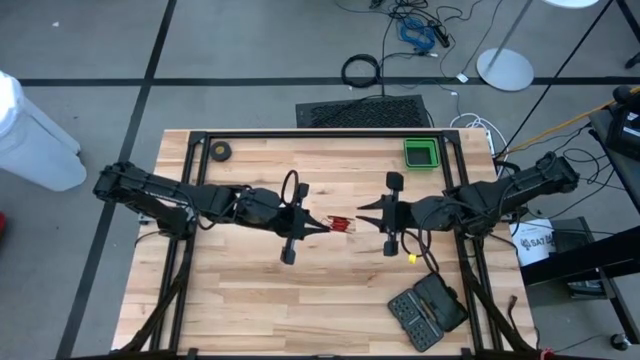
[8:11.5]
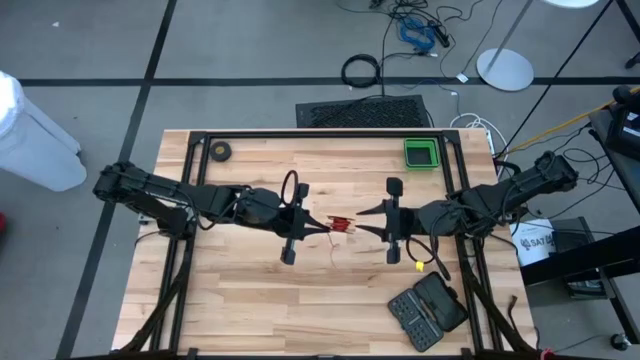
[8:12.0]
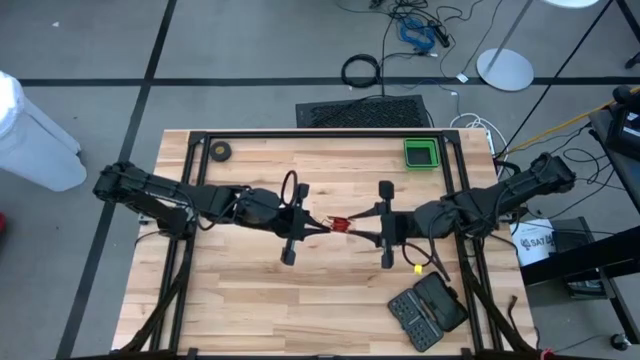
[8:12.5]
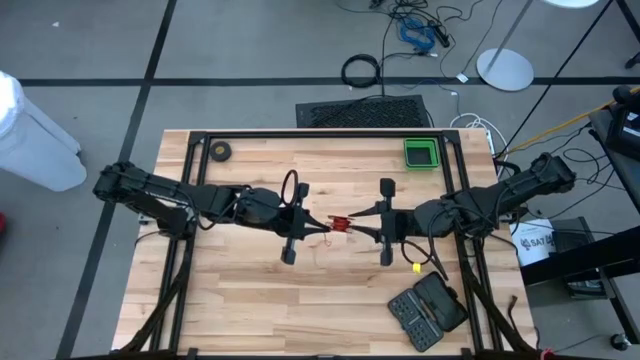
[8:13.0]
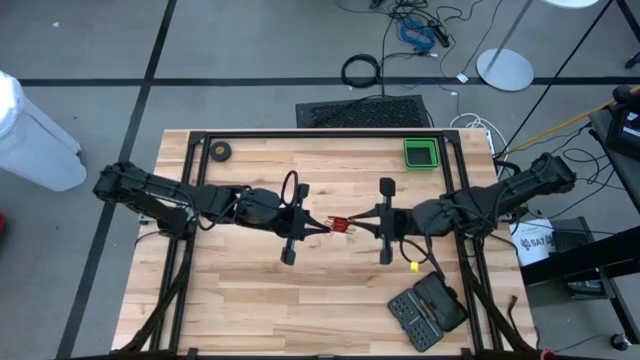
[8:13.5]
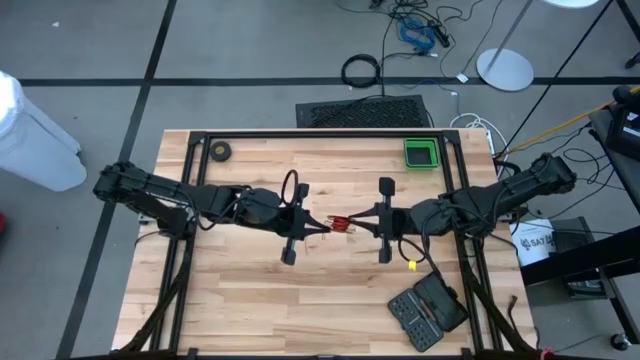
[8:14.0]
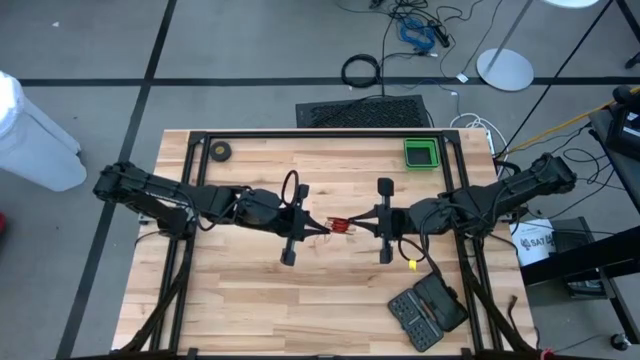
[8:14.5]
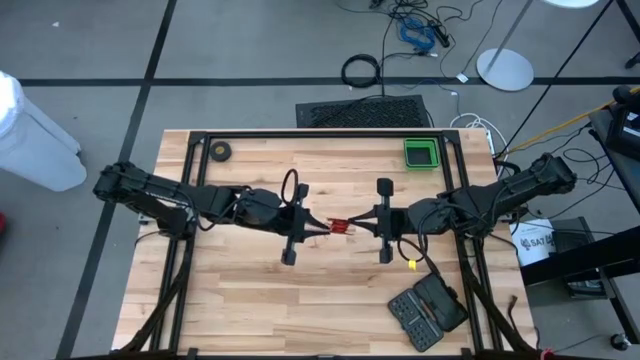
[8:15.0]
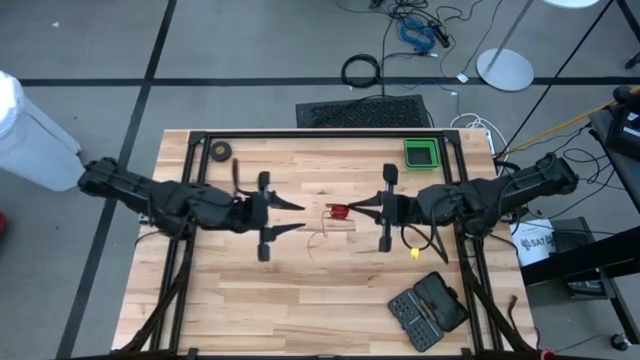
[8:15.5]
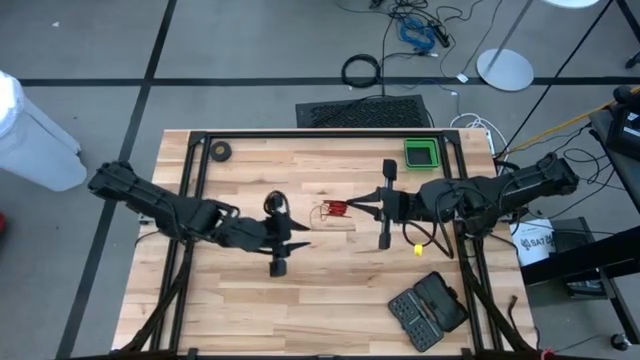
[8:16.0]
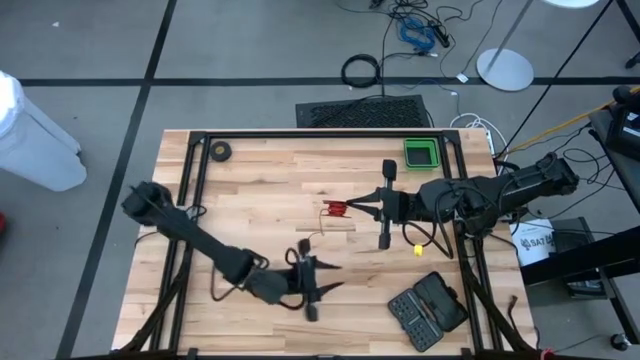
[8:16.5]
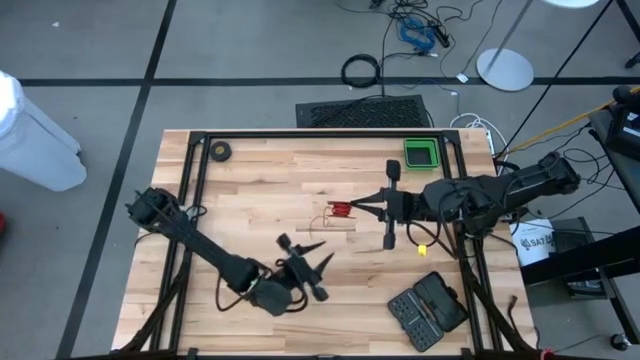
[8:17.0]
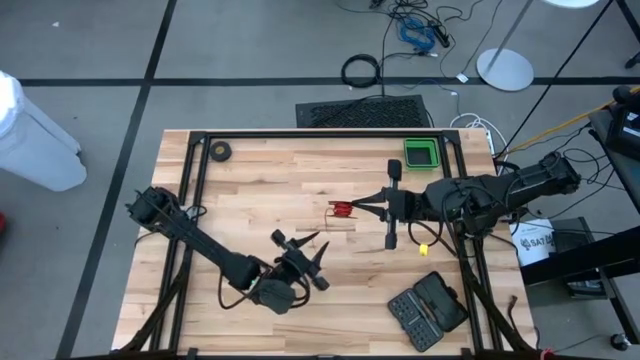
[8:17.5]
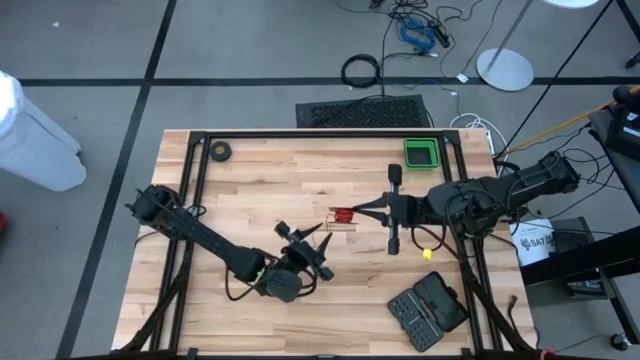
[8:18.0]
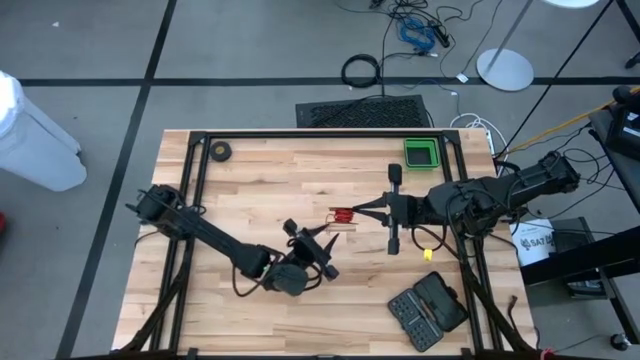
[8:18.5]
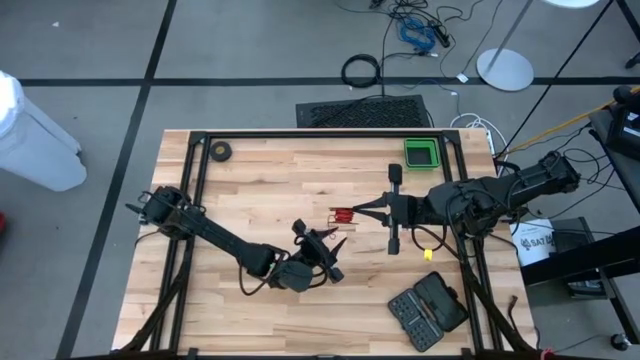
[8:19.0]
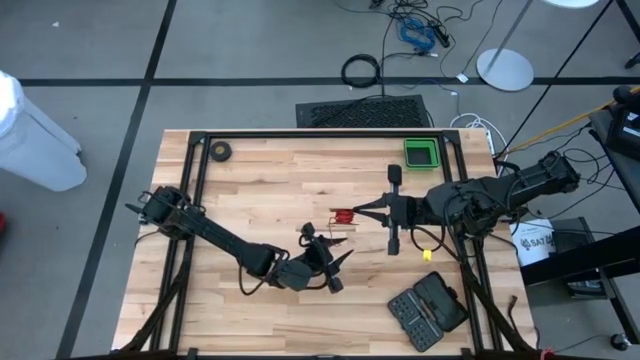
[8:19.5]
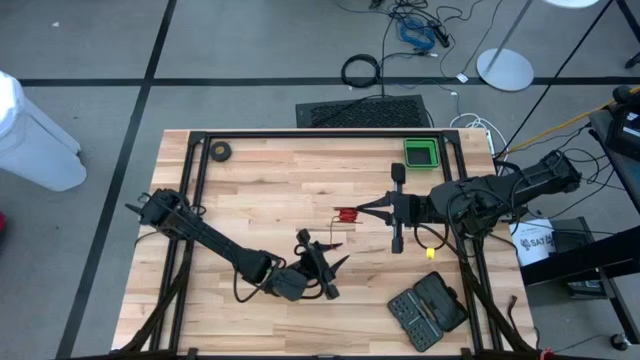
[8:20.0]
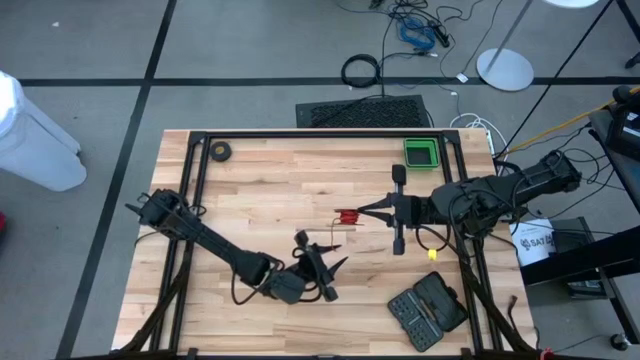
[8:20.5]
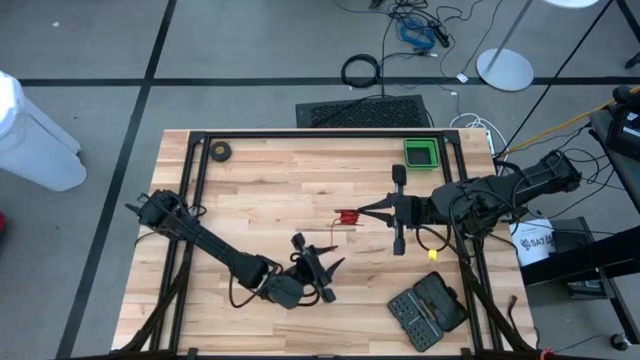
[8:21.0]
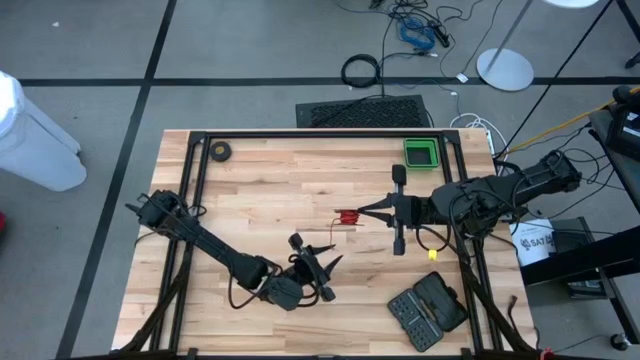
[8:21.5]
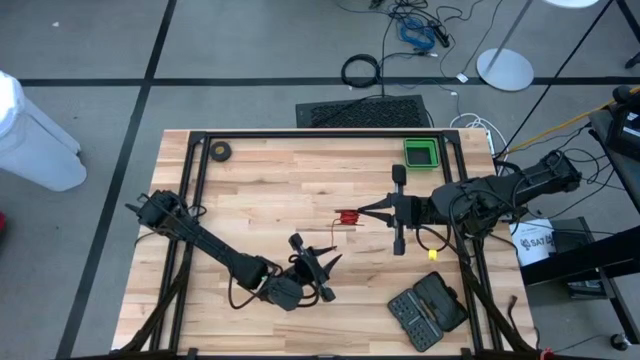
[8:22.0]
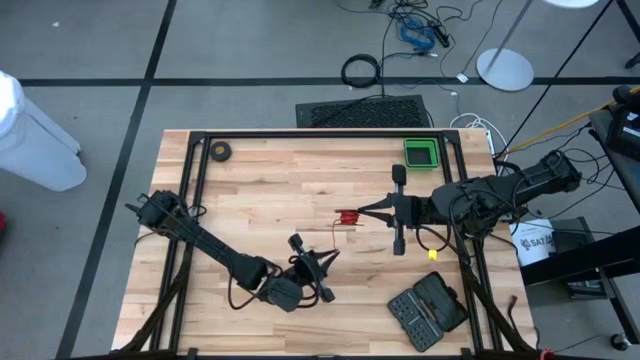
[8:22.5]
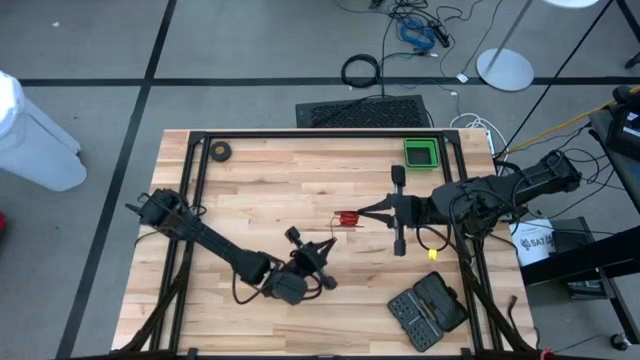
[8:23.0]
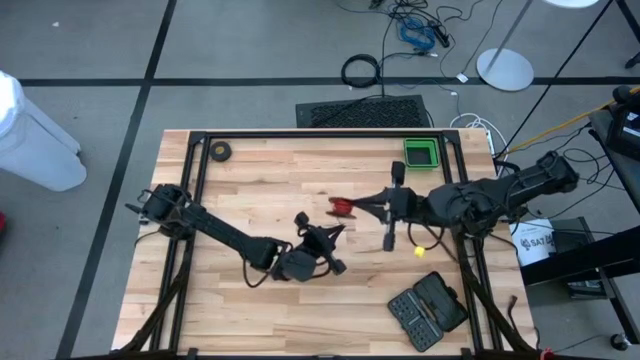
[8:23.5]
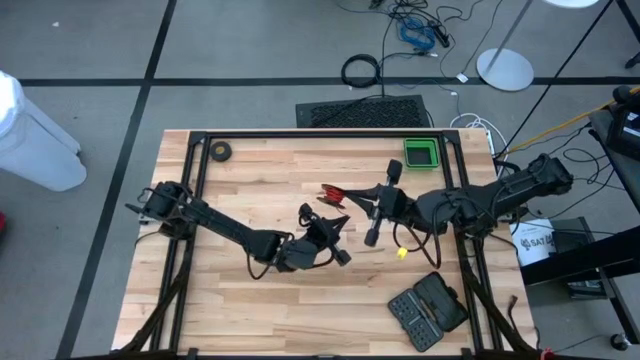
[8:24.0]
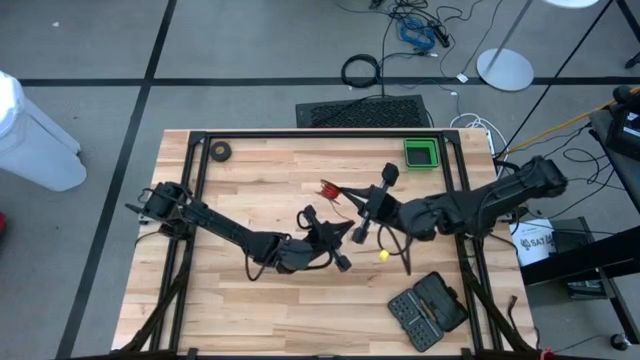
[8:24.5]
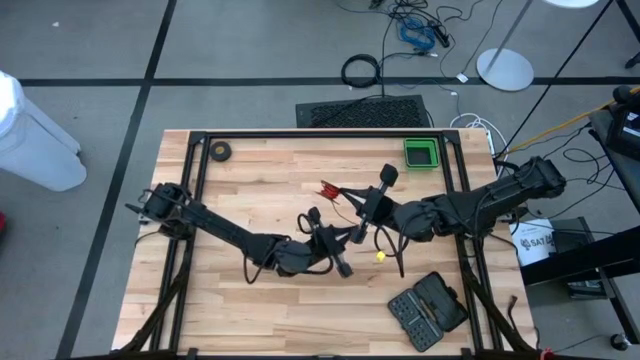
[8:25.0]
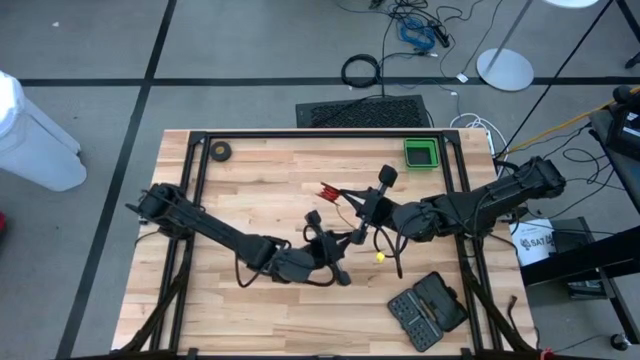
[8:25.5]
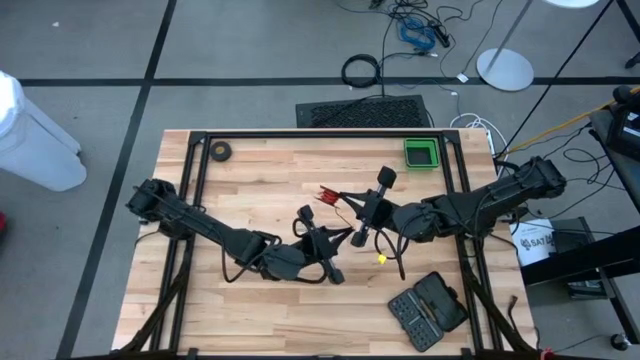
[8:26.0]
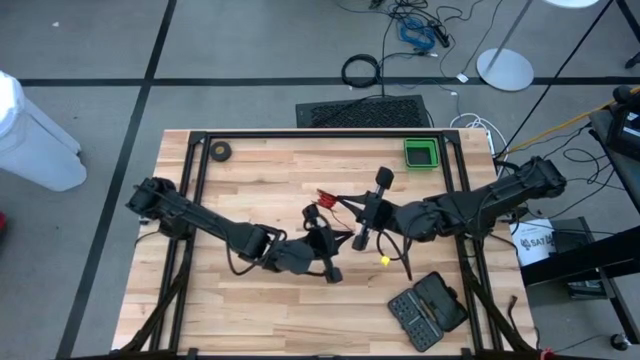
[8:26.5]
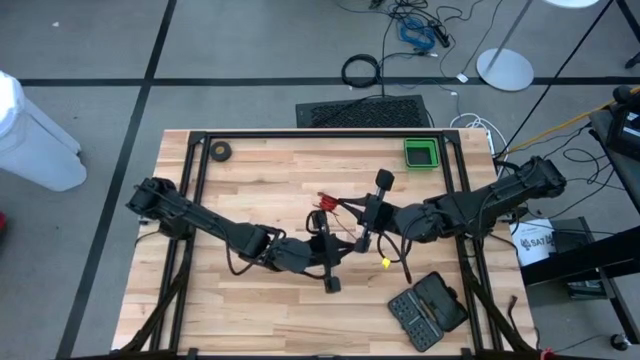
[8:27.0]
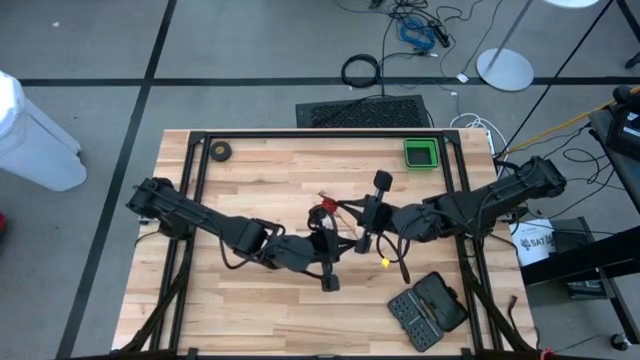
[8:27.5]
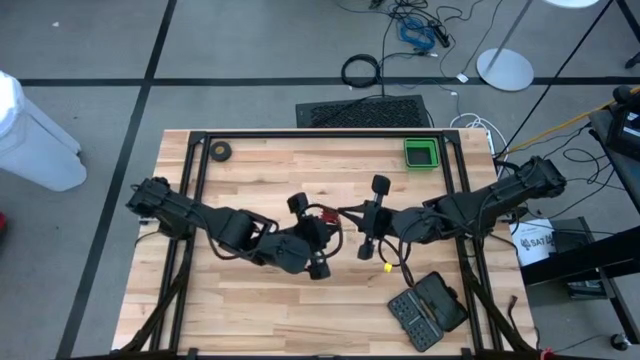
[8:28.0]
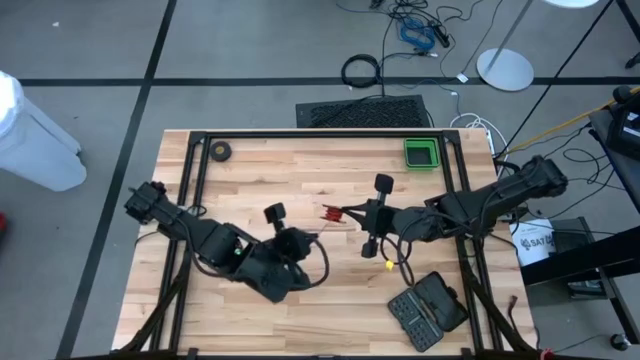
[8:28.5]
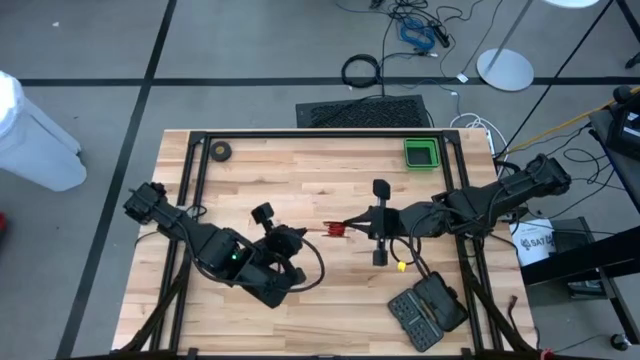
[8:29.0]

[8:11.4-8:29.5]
Task: Coil cords
Coil the red wire into the spool
